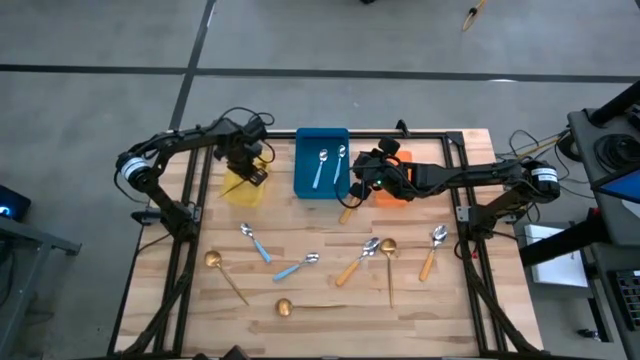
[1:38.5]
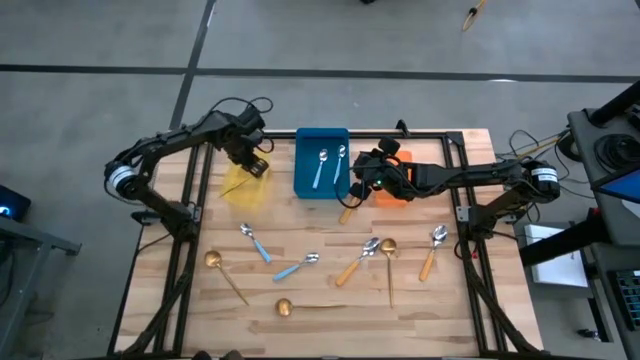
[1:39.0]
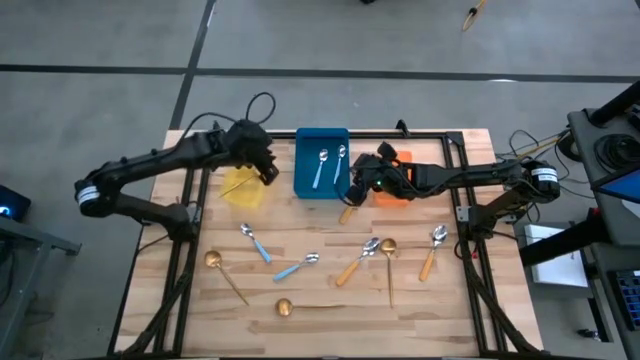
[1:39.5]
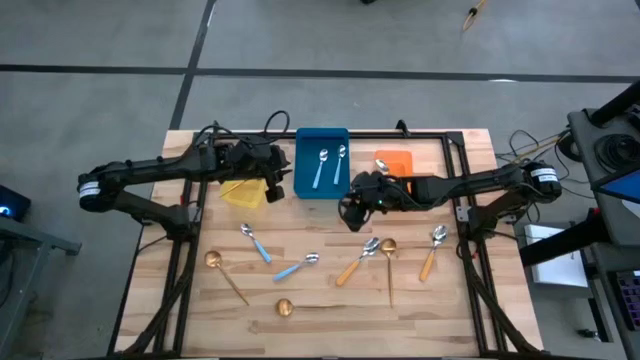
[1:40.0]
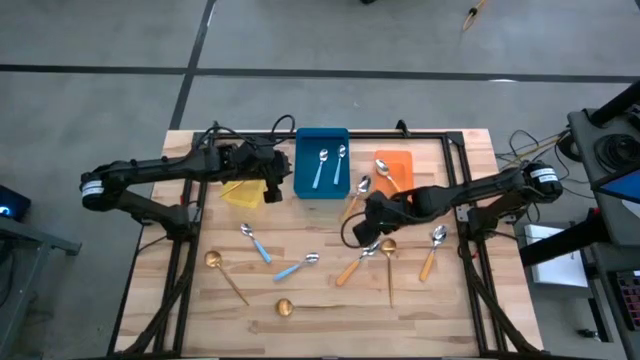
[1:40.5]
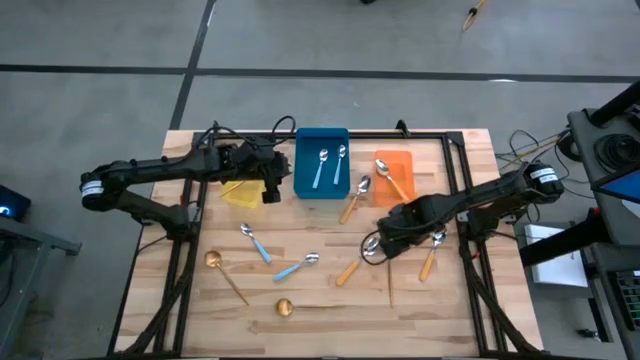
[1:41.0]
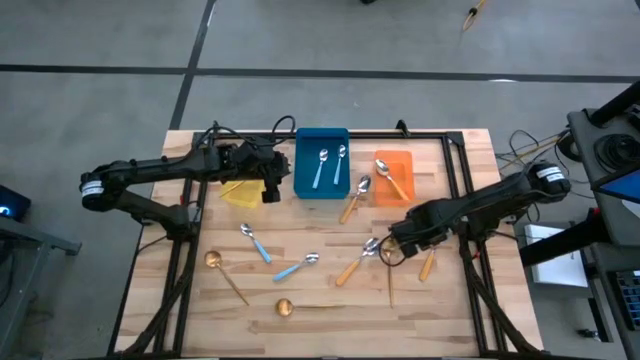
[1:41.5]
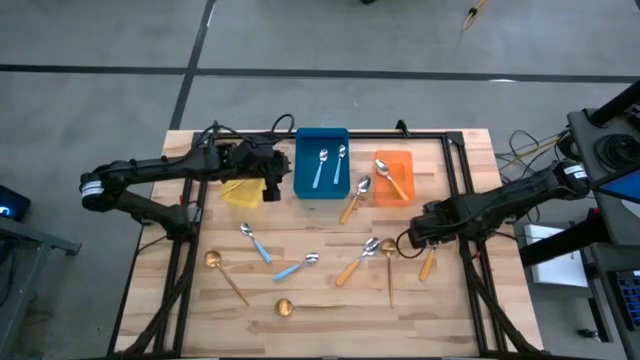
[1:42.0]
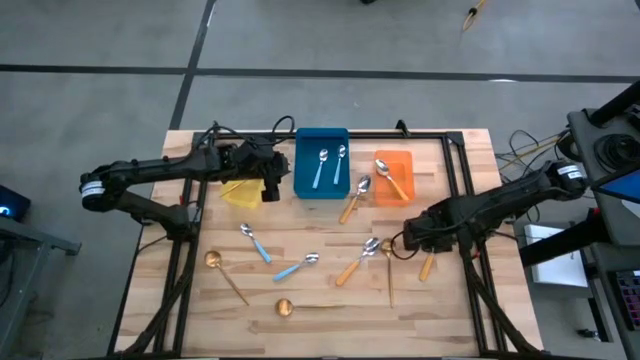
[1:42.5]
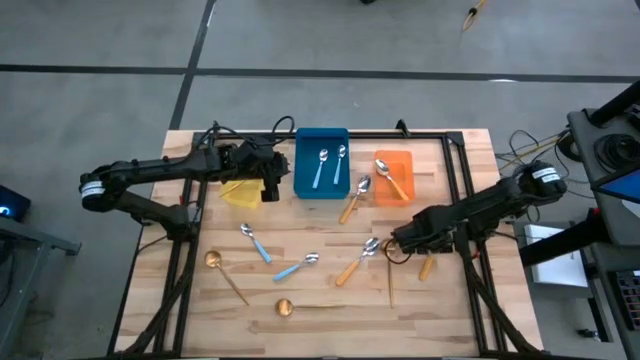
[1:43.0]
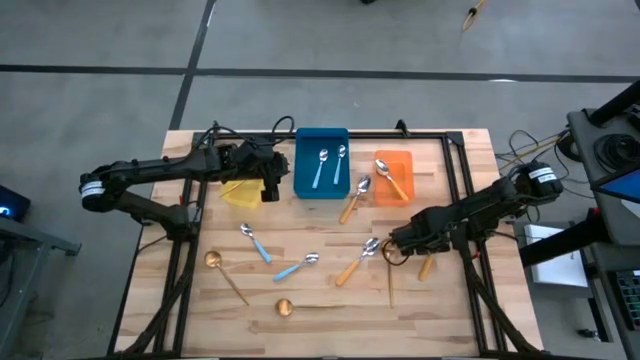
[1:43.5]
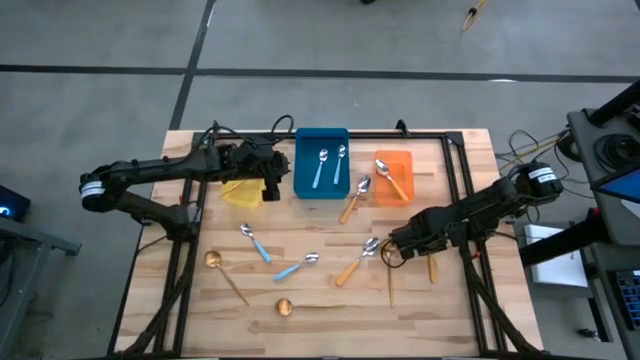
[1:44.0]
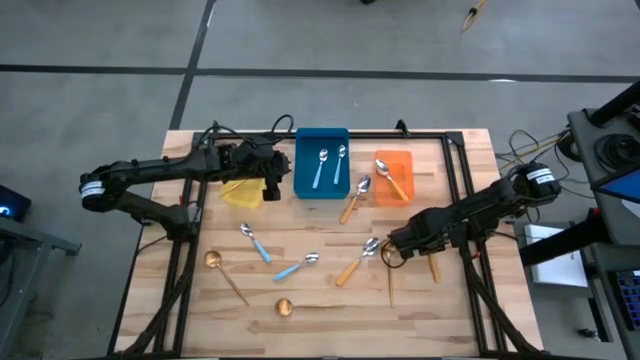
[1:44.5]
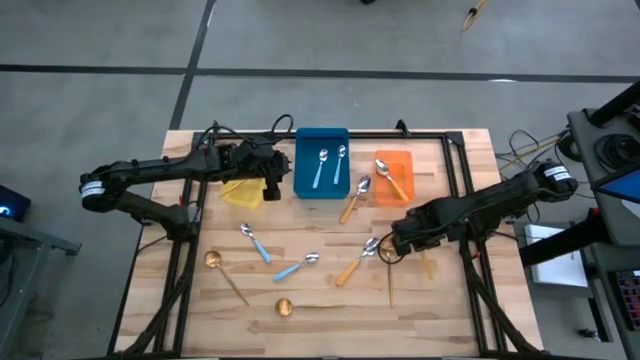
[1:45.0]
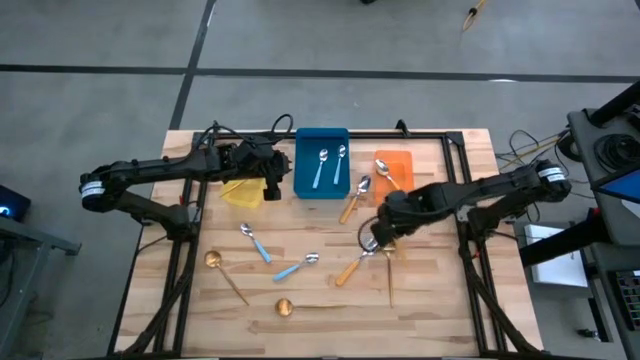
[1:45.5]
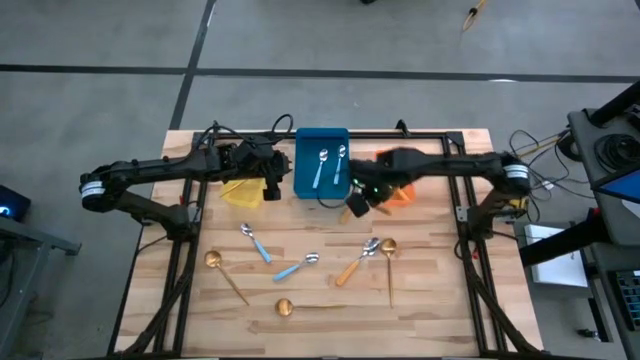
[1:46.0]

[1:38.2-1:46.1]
Task: Sort silverware by color (type)
Put the yellow spoon into the orange bin

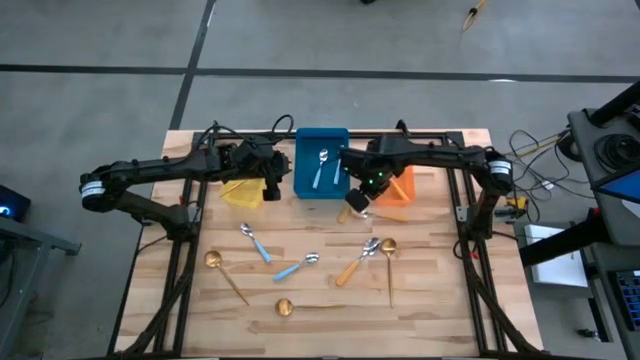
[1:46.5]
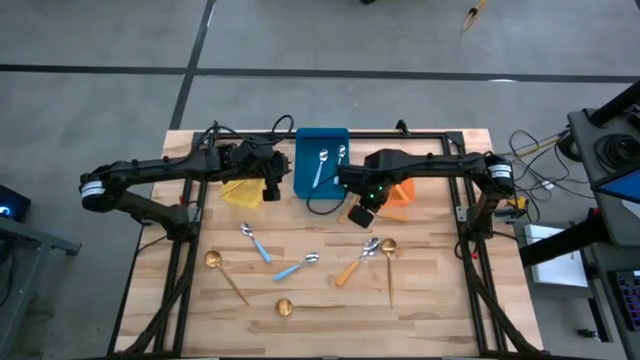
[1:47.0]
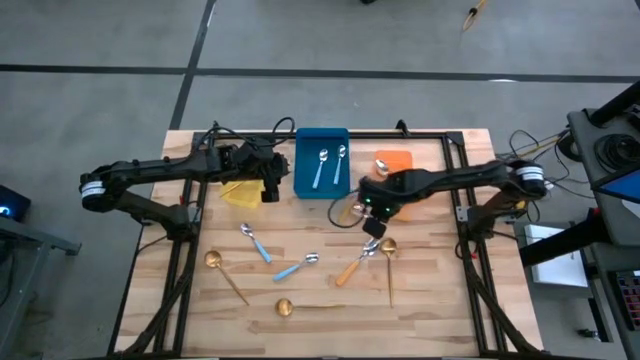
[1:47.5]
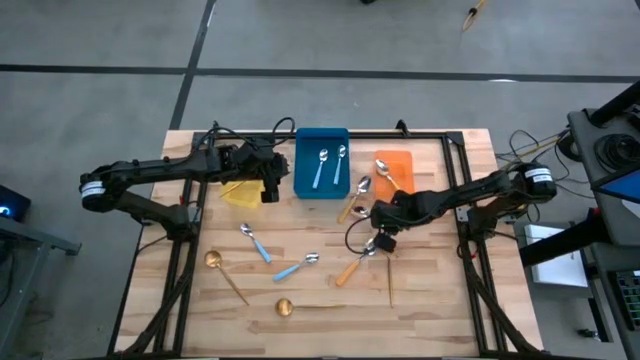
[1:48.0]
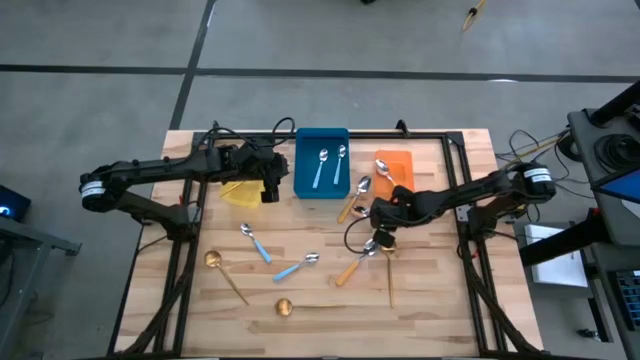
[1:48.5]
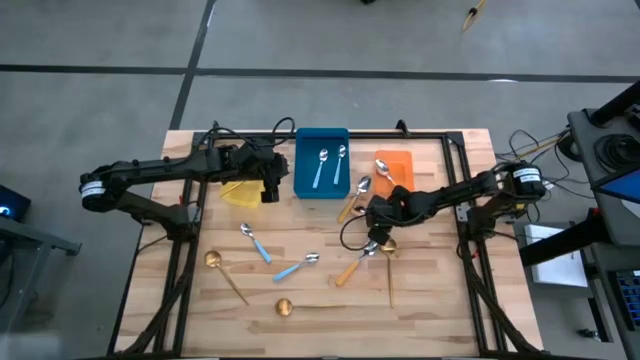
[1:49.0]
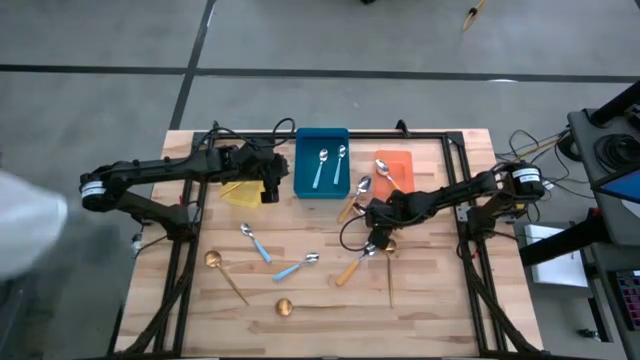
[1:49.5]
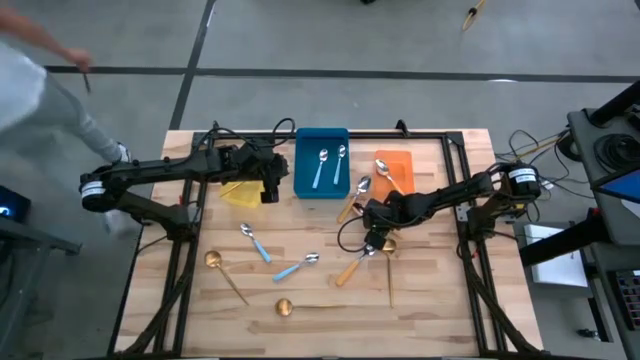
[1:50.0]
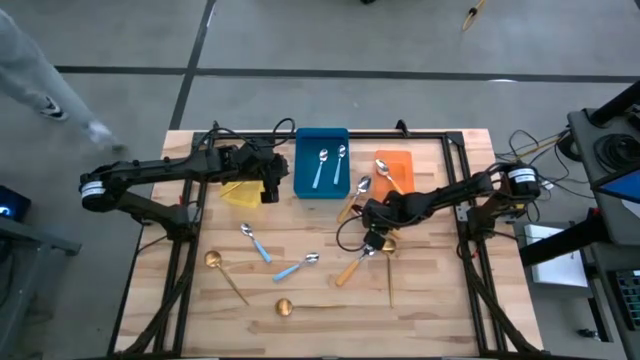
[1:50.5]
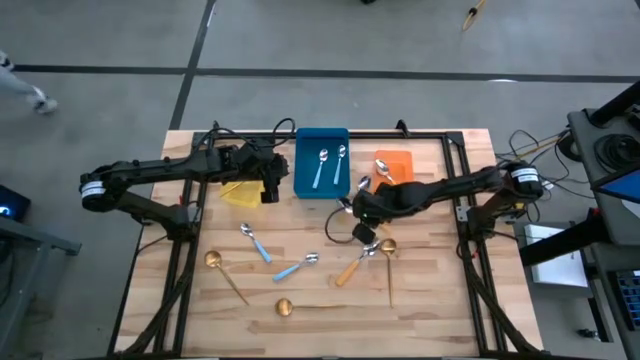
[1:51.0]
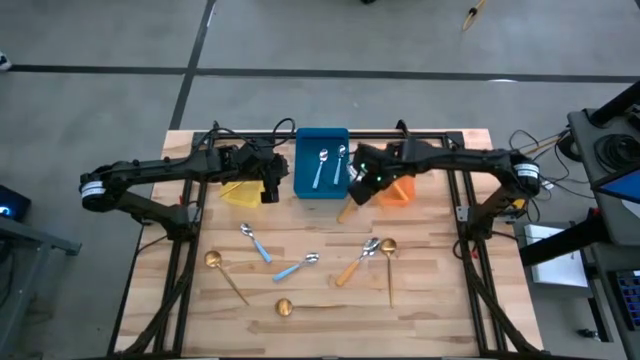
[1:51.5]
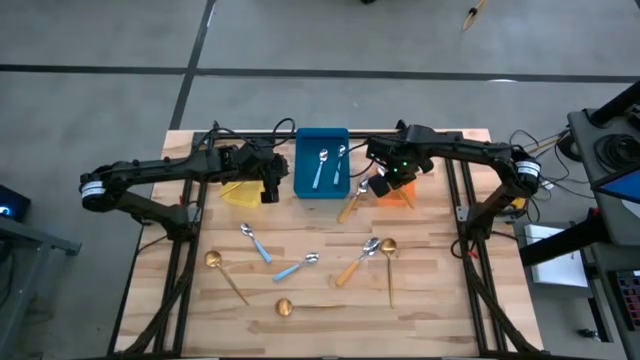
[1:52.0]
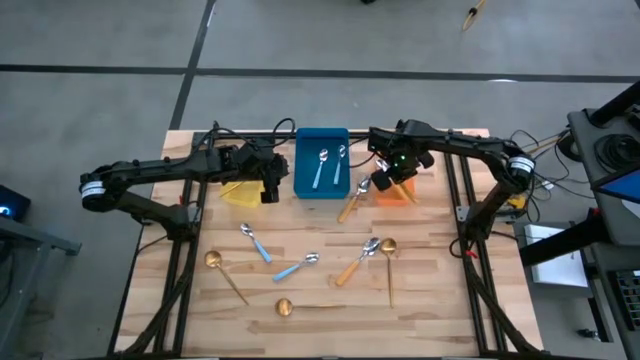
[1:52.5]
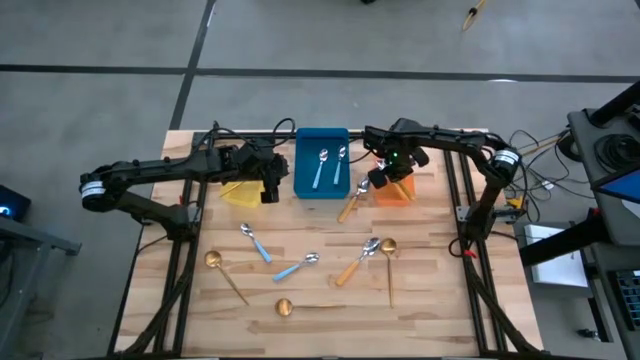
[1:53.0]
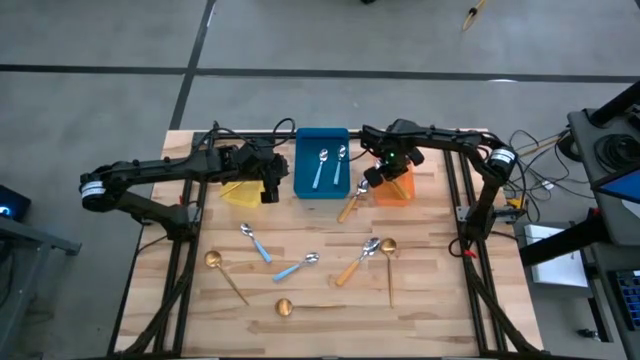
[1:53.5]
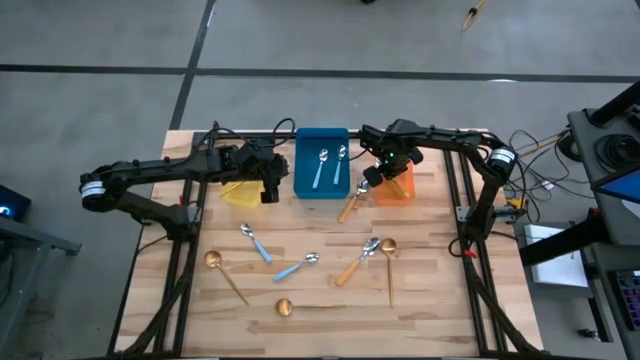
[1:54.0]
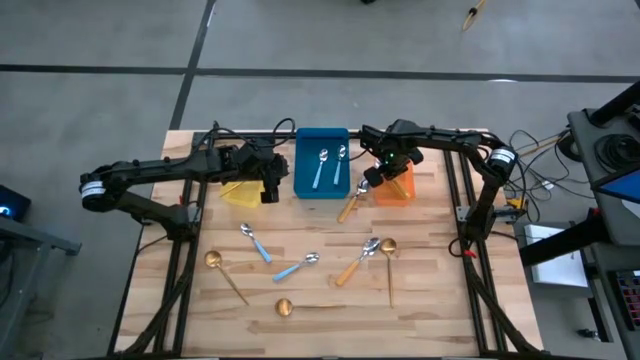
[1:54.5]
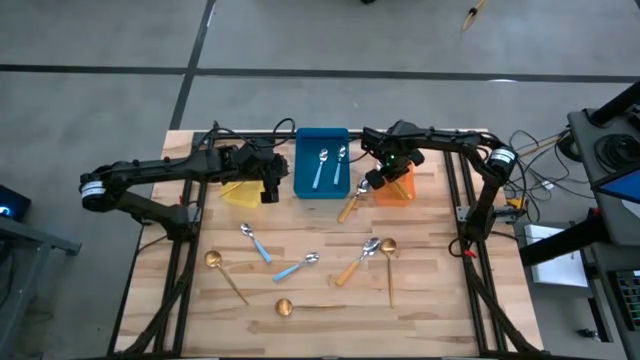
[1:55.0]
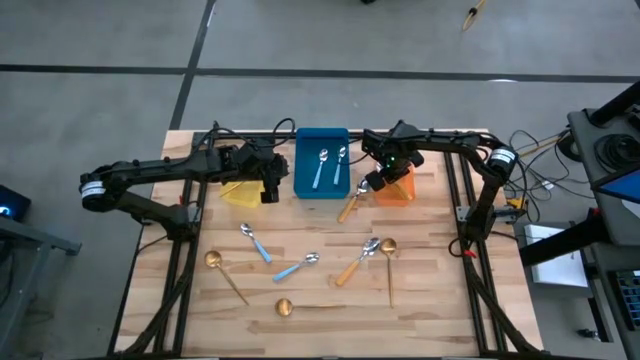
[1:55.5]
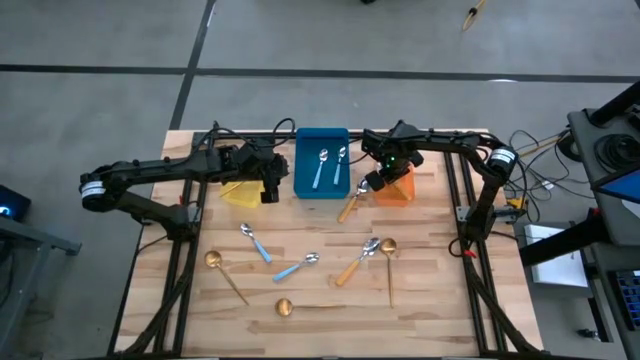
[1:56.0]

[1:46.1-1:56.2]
Put the yellow spoon into the orange bin

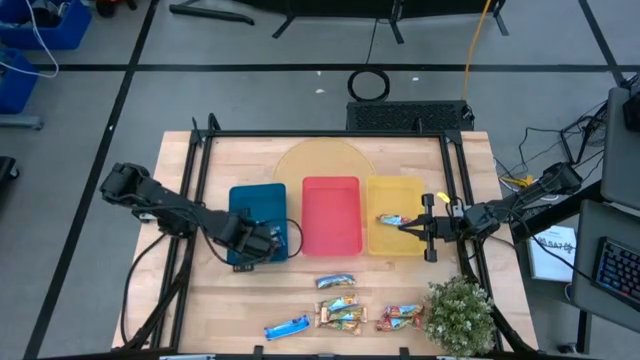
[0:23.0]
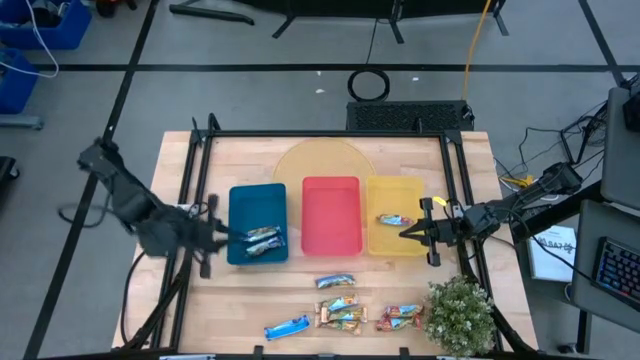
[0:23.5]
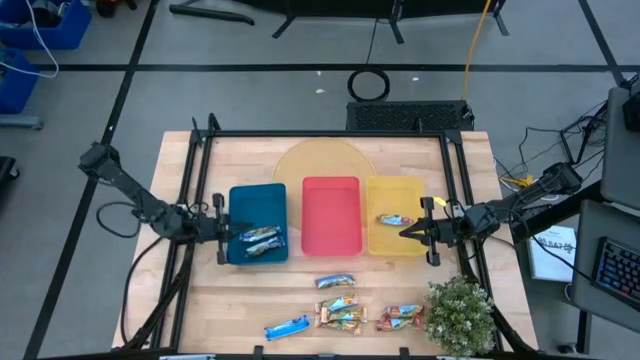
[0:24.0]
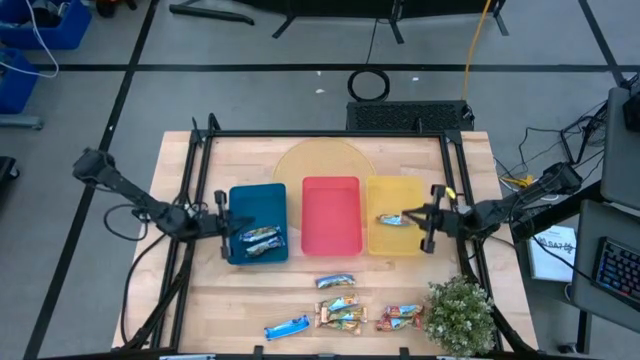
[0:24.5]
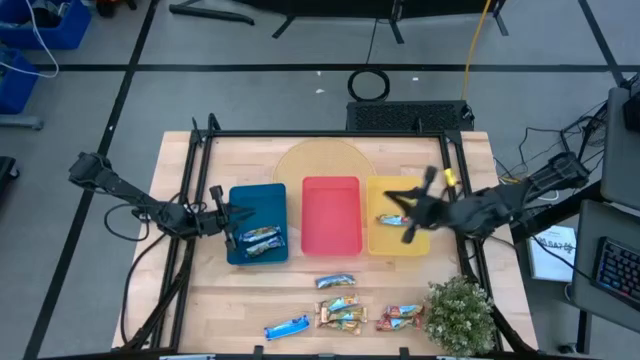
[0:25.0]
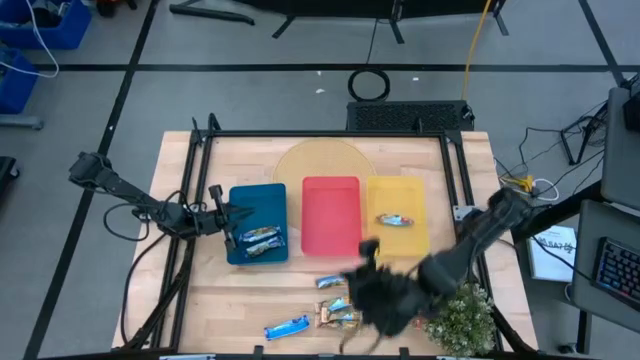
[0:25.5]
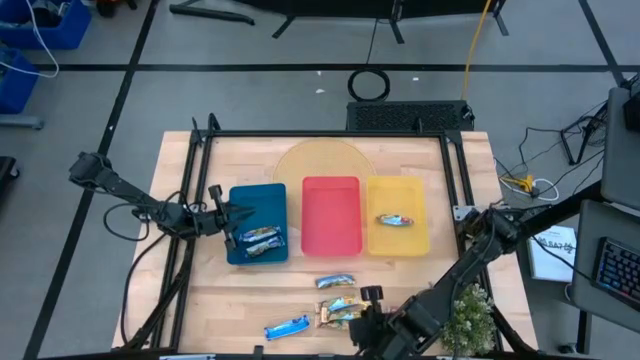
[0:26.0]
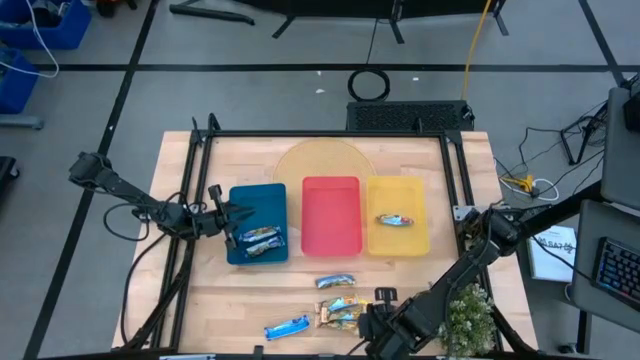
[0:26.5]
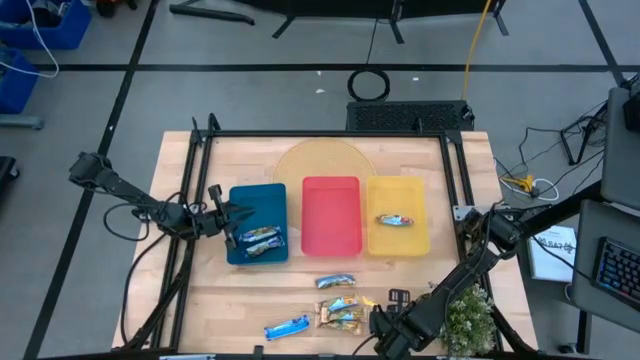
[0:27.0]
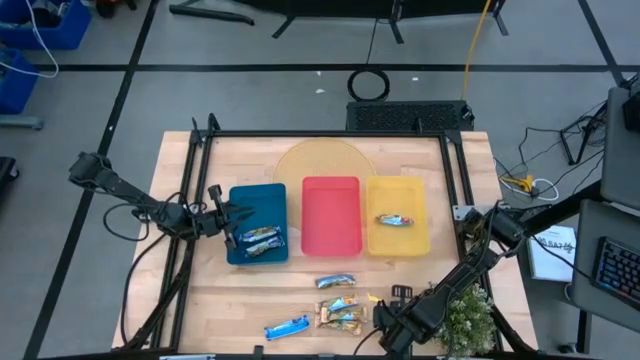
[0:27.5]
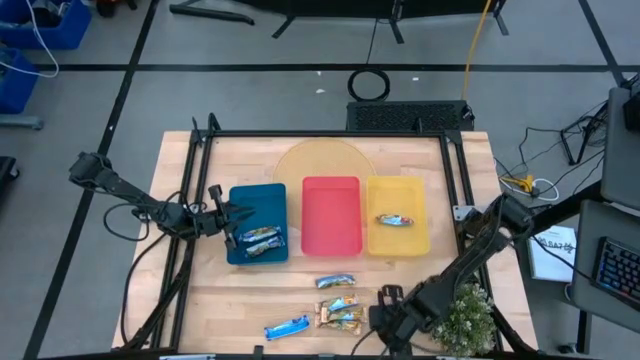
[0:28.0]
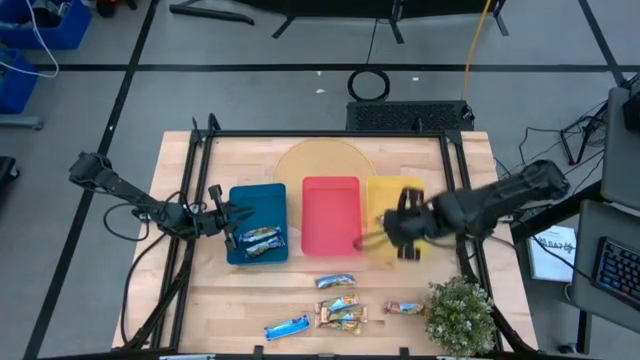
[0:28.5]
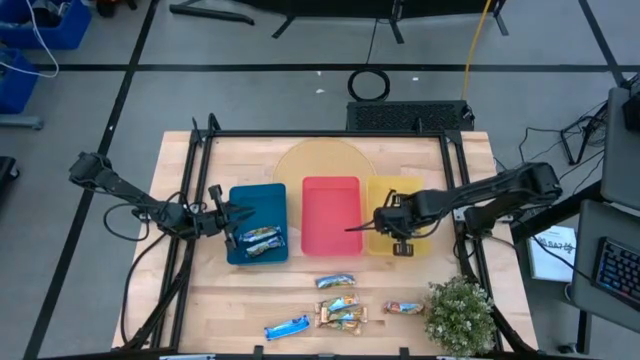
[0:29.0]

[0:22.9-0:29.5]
Task: Pick and place Granola Bars by type
Put the bottom red granola bar into the yellow bin
